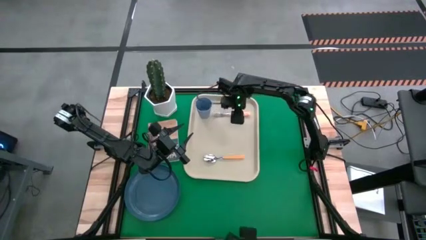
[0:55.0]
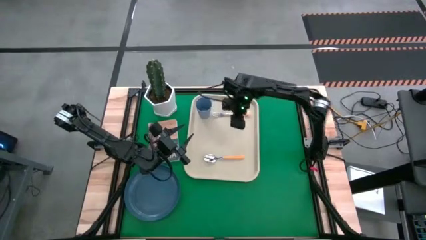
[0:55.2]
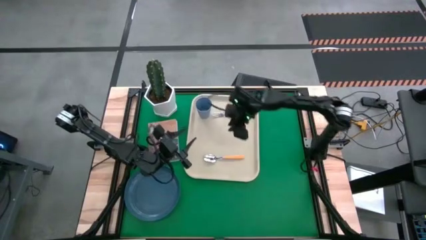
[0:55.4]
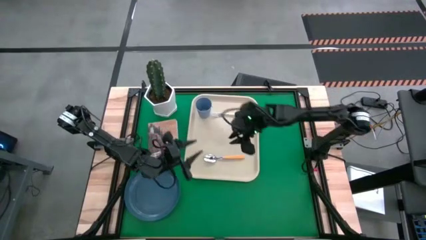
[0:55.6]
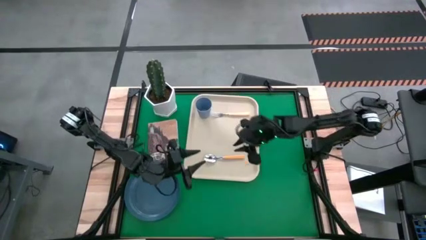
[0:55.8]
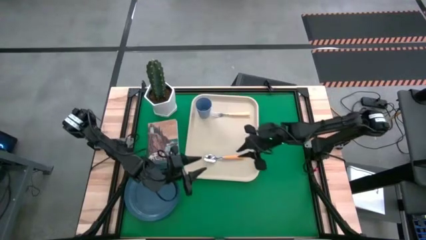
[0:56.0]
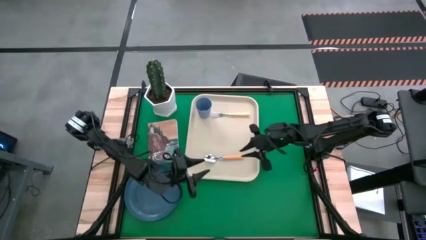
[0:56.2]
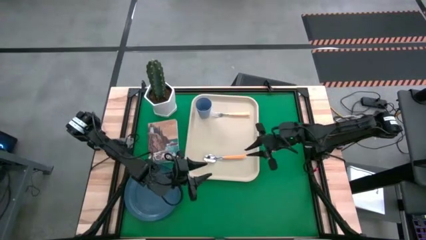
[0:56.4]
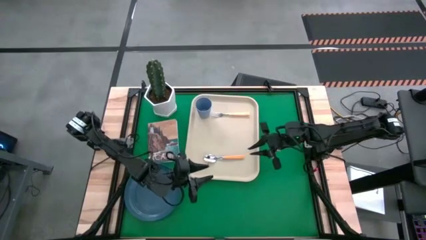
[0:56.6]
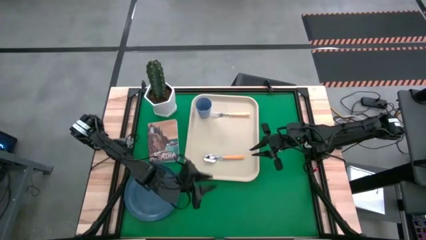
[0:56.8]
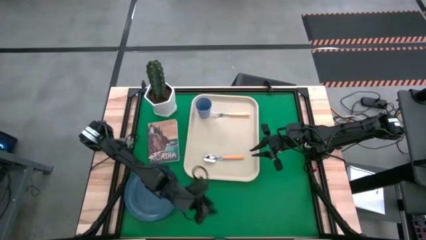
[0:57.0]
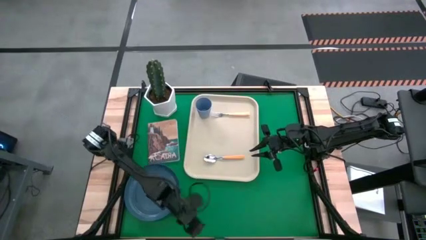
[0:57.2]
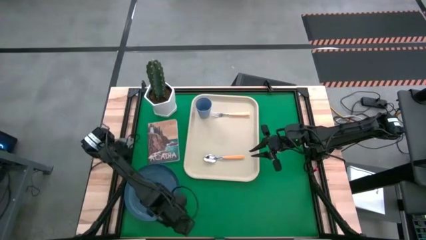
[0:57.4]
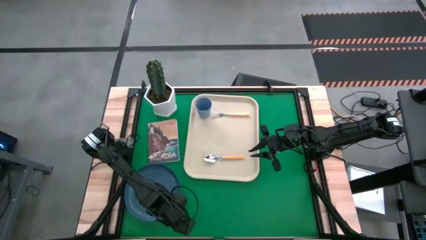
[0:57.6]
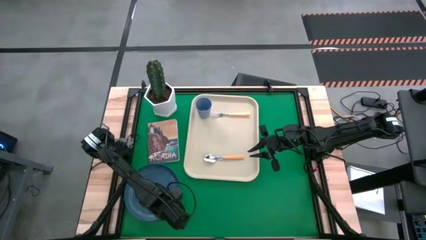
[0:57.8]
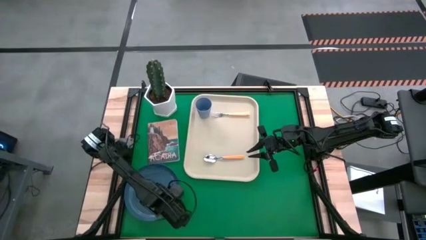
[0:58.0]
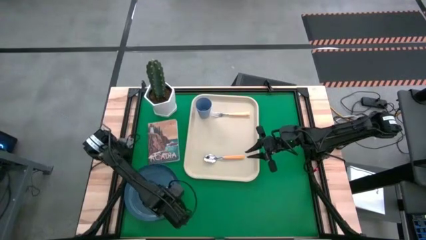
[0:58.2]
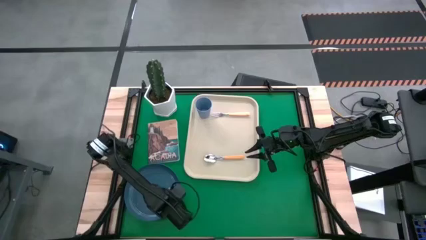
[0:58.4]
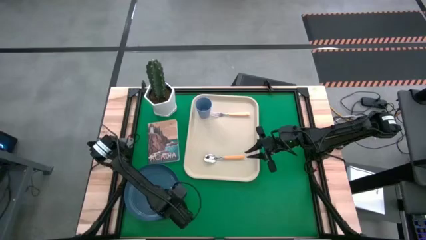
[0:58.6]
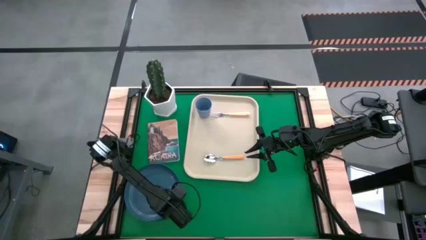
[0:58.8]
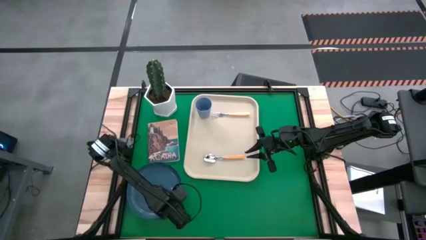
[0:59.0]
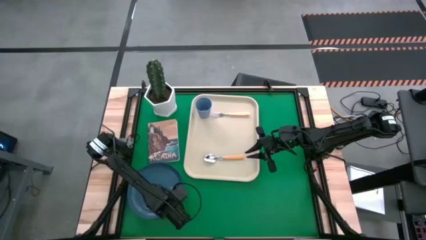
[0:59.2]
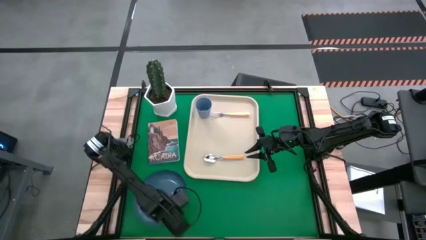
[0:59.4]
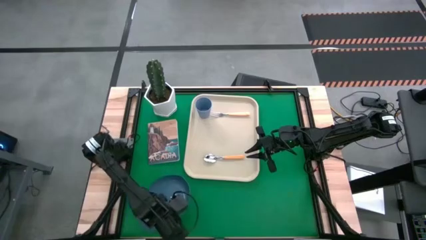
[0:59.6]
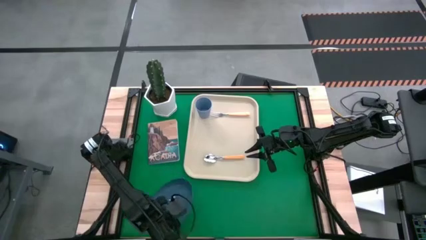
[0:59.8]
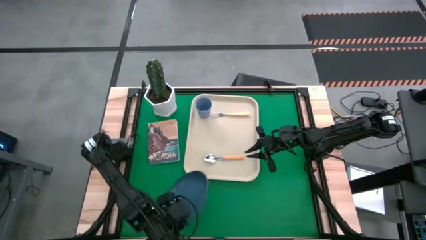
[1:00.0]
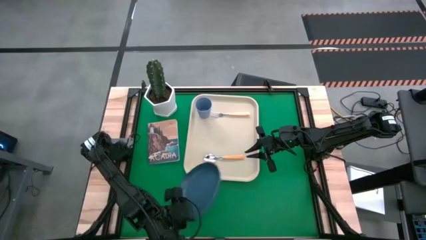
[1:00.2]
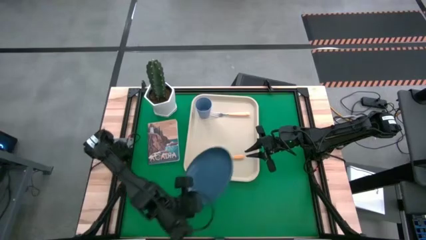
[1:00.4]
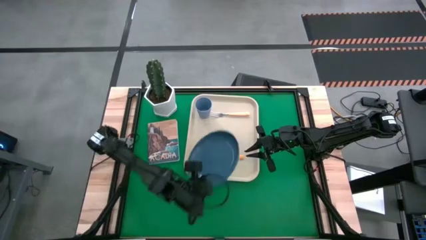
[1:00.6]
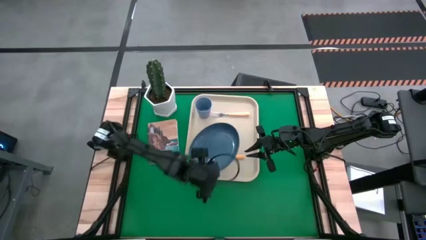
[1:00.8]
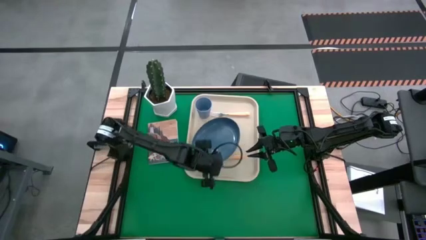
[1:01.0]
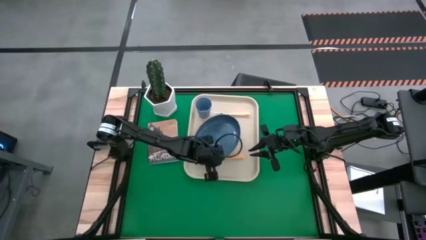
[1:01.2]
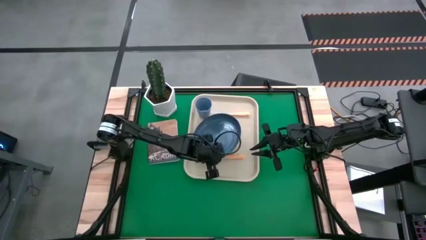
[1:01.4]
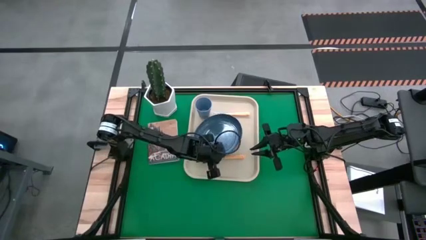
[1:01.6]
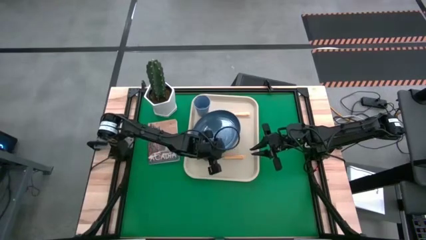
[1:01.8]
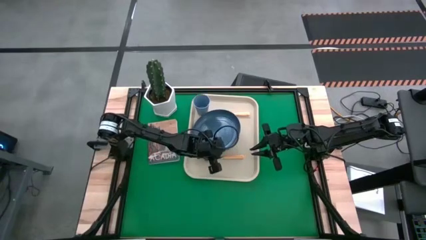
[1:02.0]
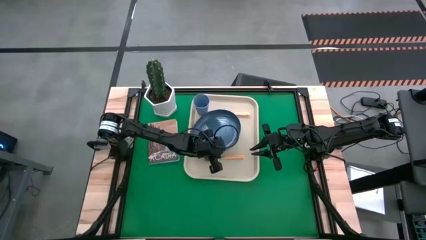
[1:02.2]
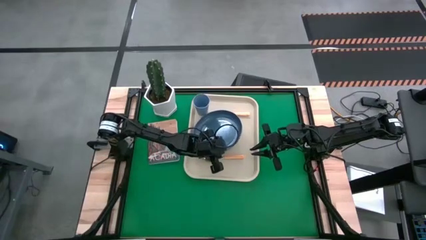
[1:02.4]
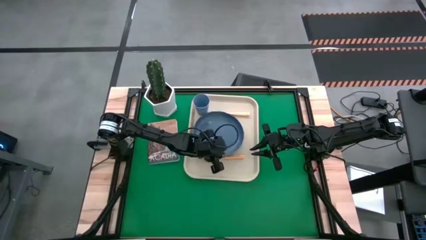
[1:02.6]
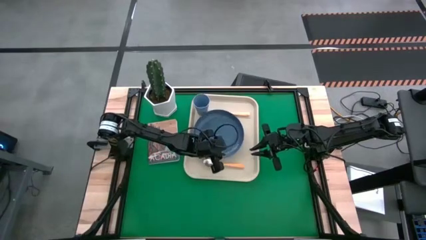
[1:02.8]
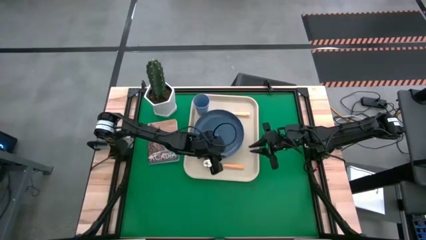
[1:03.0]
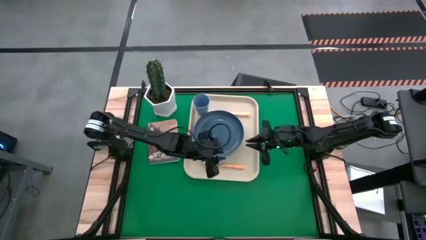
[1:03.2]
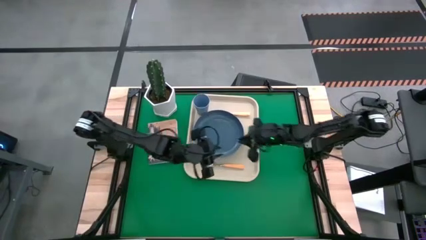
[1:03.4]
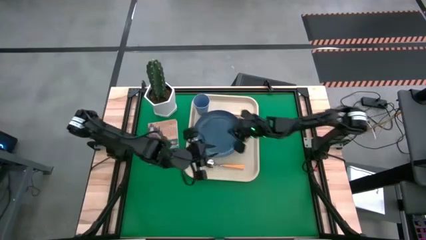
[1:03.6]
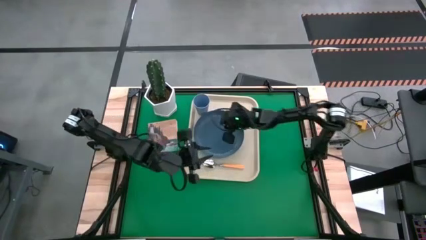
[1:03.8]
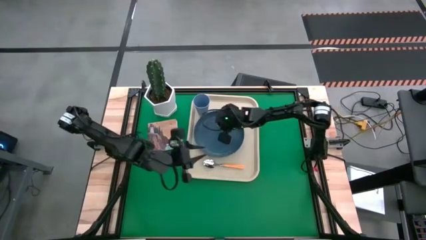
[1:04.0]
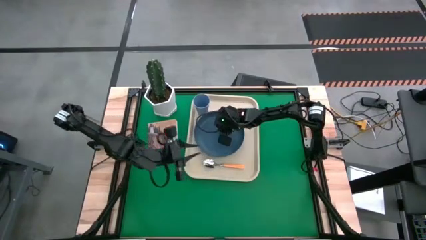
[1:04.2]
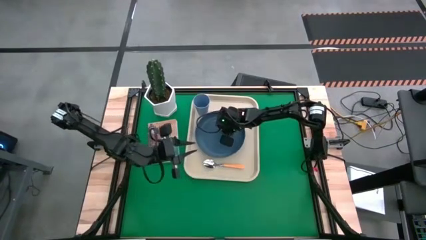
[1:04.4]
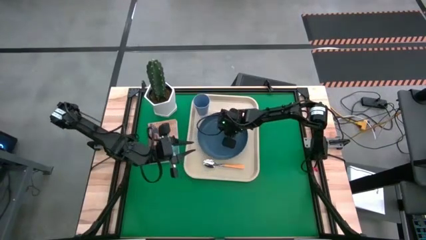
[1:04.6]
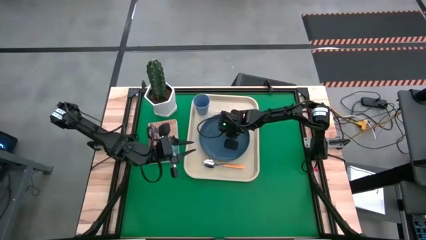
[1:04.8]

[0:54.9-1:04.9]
Task: Pick and place plate/cup/fork/spoon on tray
Put the blue plate on the white tray between the orange spoon and the light orange fork

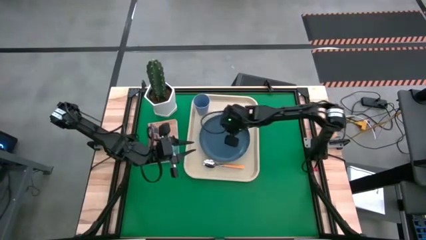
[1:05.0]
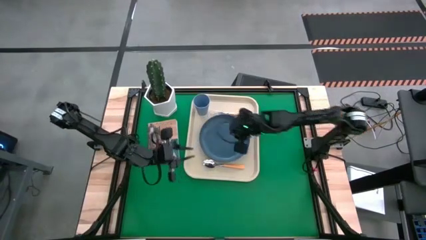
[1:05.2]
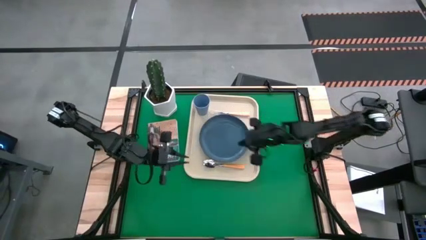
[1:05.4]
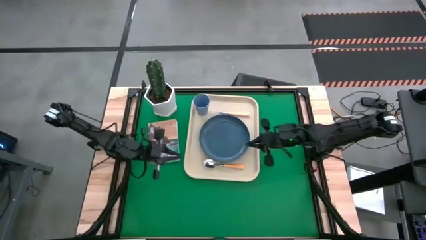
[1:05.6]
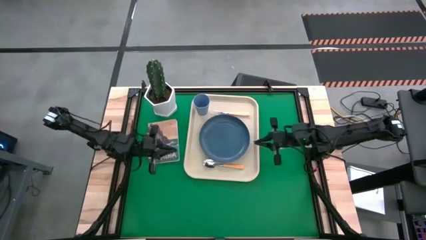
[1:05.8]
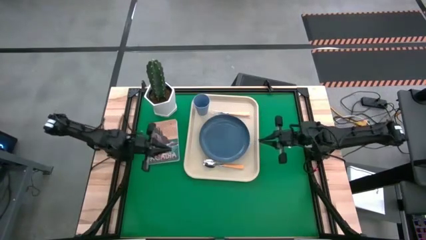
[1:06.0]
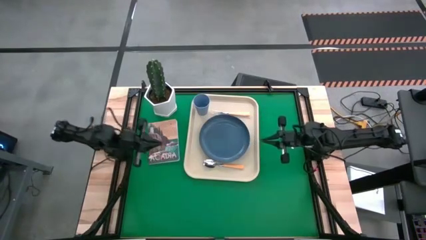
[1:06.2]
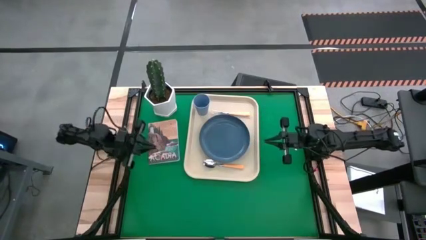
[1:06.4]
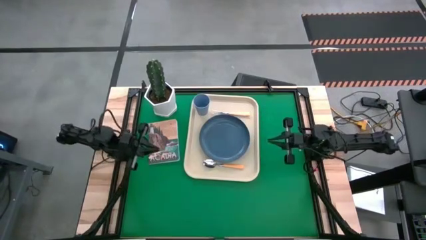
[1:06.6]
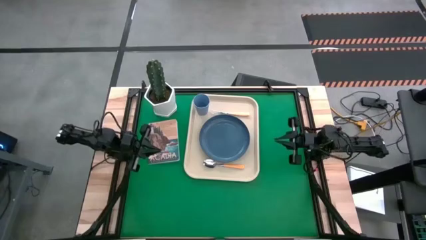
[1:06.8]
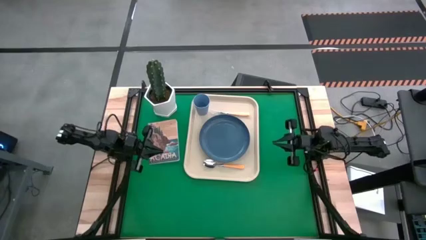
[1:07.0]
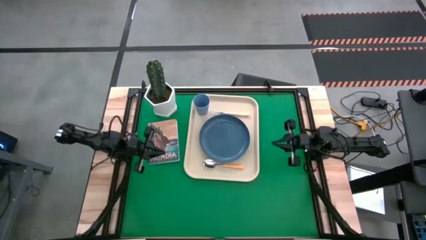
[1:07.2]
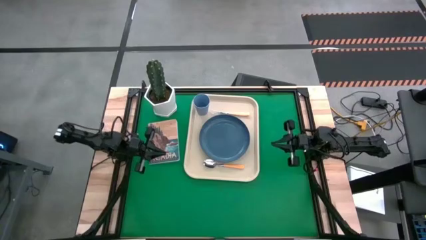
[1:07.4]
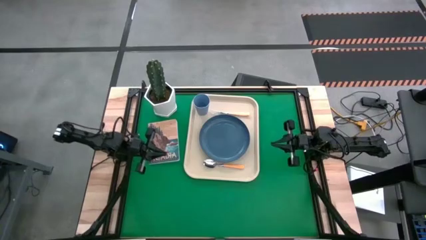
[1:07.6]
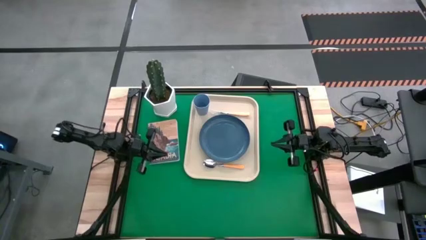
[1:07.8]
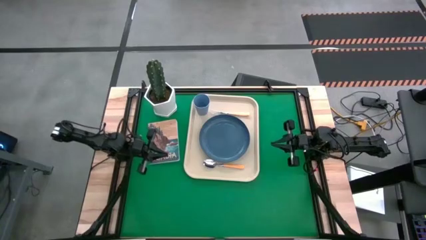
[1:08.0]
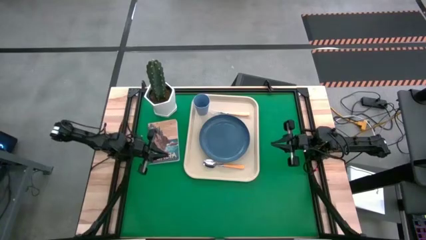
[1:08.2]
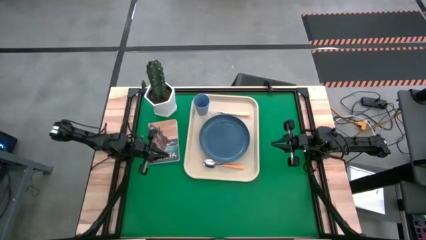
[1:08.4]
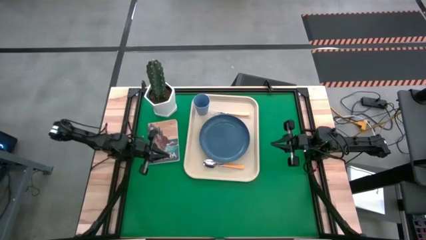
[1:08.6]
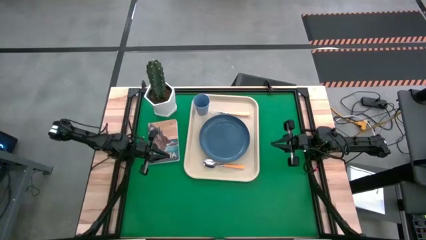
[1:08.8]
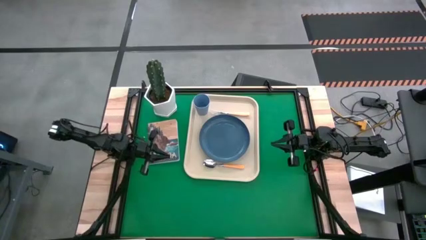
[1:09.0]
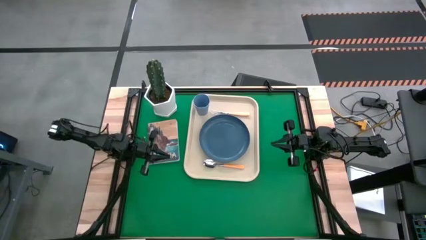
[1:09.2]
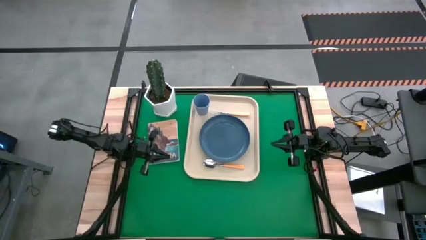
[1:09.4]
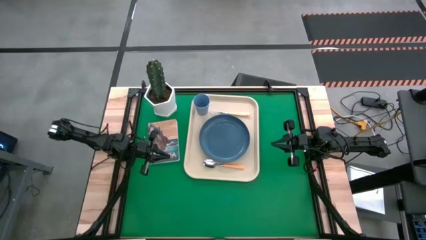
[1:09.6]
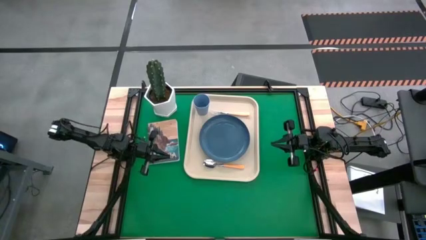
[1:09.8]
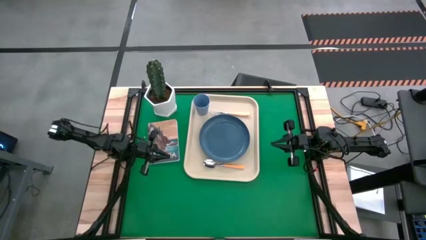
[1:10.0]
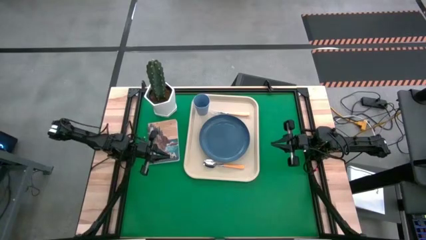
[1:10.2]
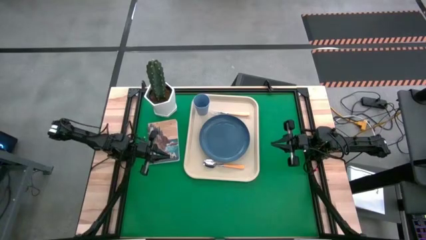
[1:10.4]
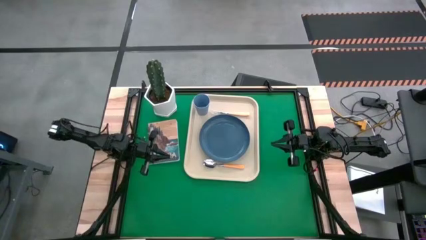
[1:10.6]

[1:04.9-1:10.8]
Return to Home Position
